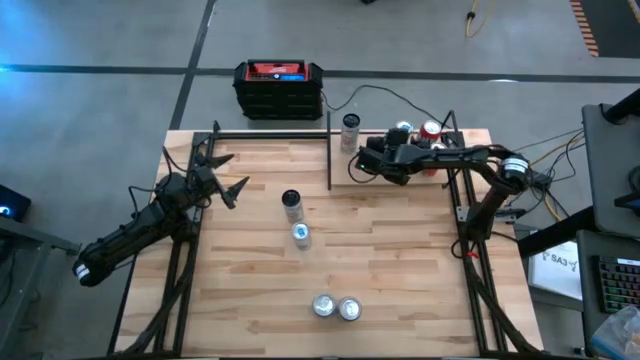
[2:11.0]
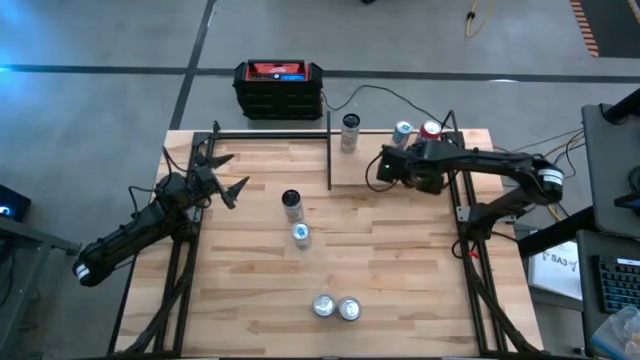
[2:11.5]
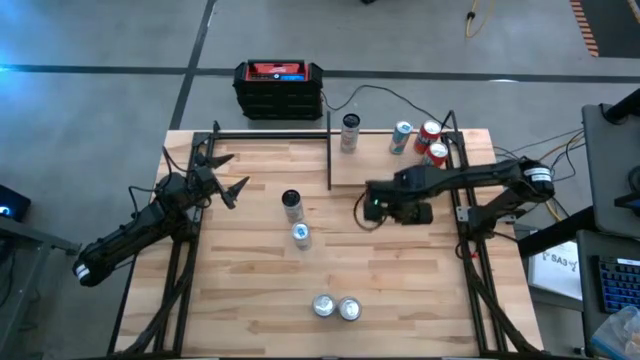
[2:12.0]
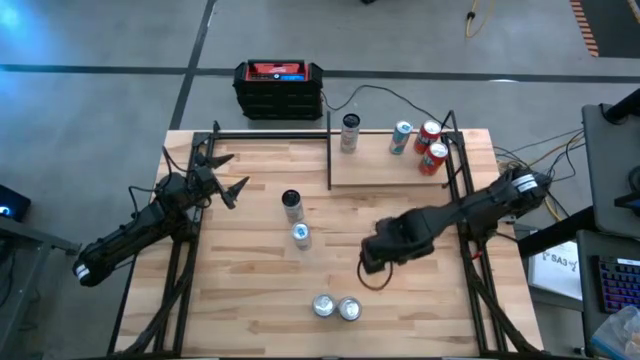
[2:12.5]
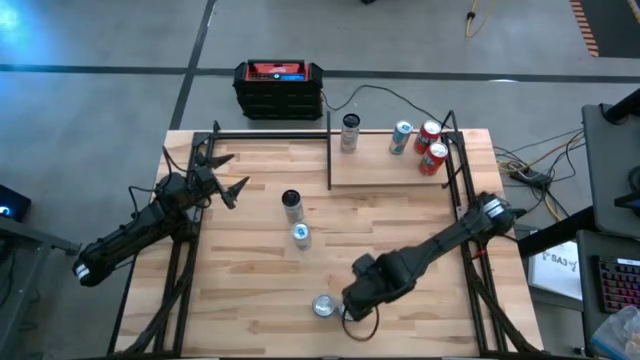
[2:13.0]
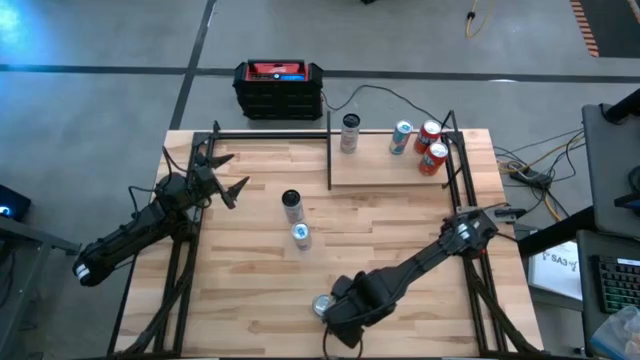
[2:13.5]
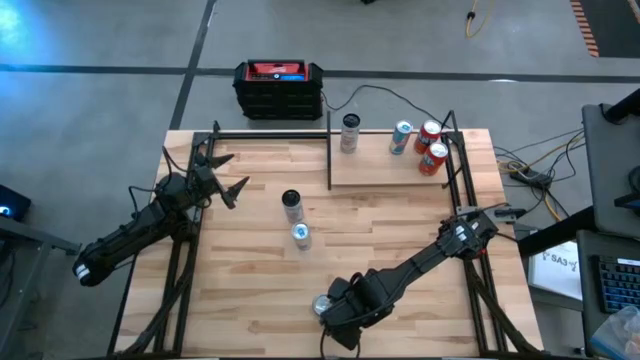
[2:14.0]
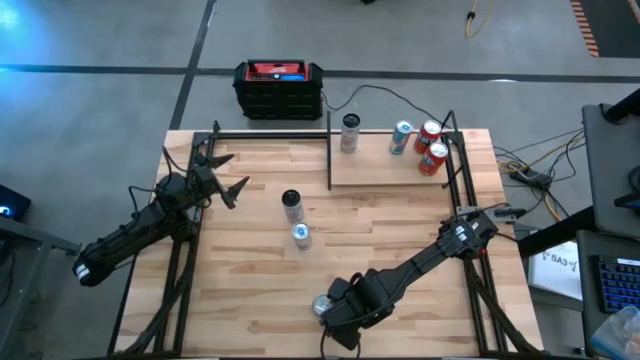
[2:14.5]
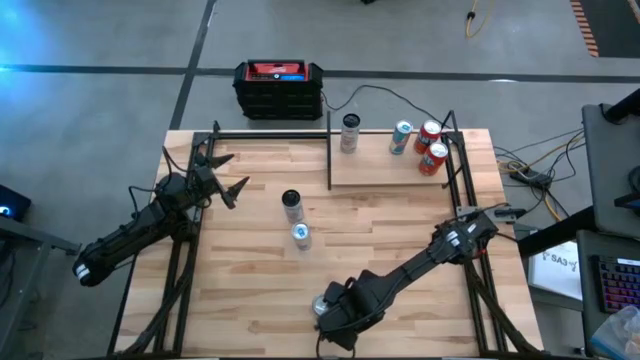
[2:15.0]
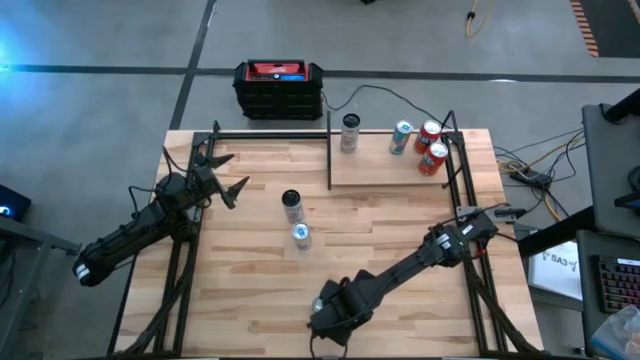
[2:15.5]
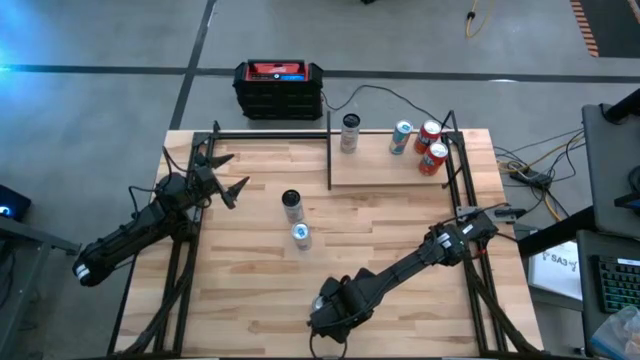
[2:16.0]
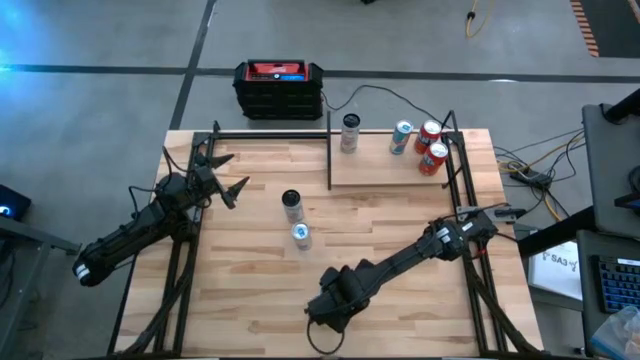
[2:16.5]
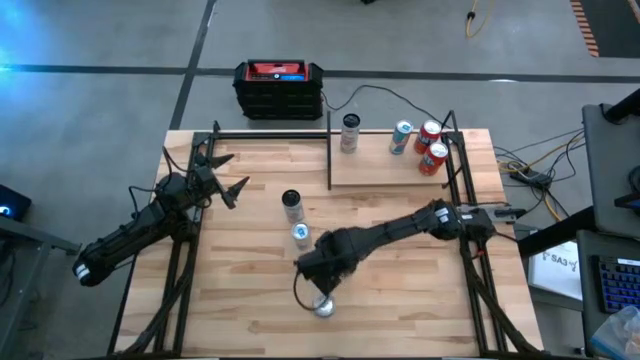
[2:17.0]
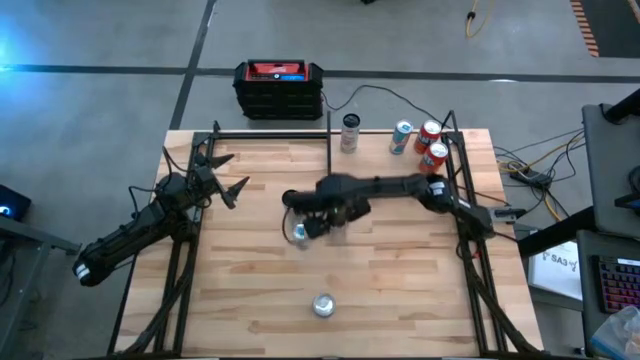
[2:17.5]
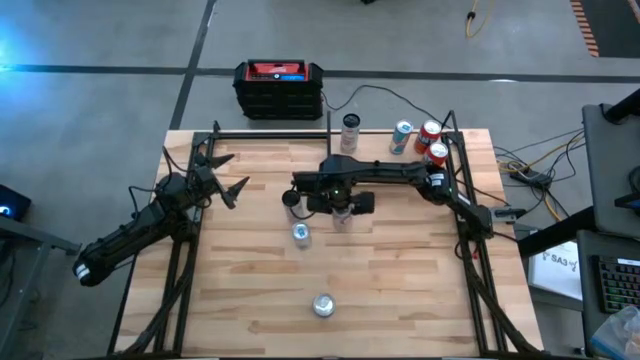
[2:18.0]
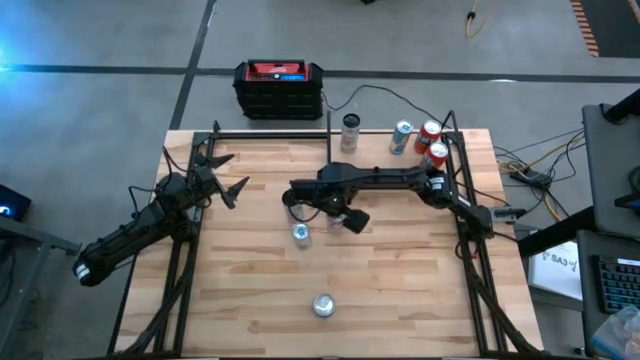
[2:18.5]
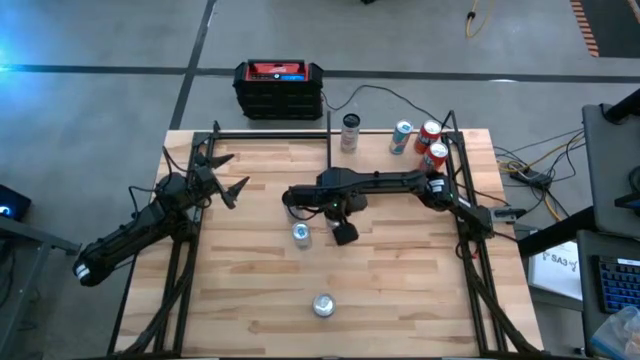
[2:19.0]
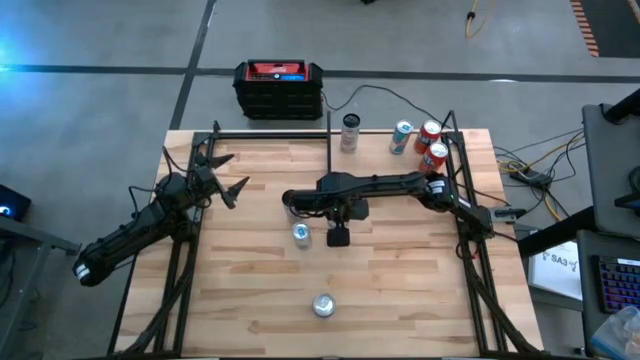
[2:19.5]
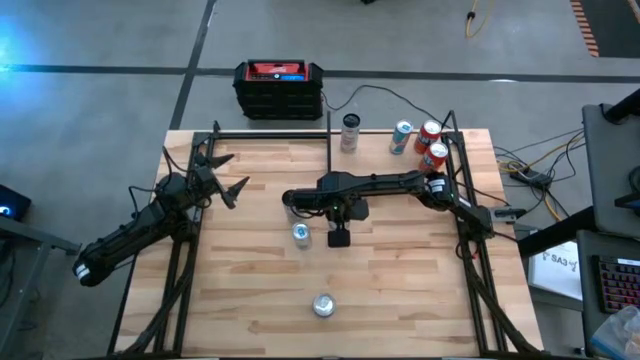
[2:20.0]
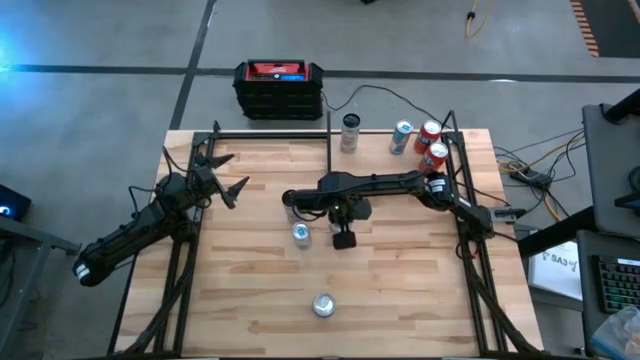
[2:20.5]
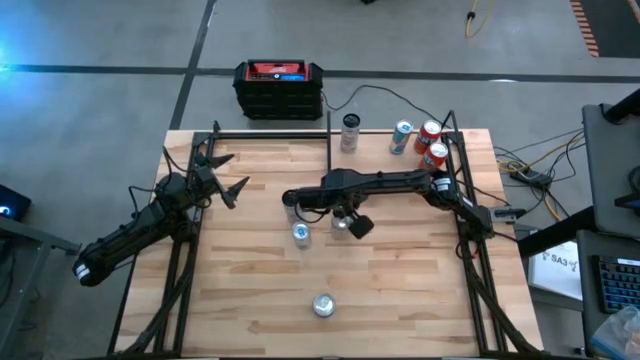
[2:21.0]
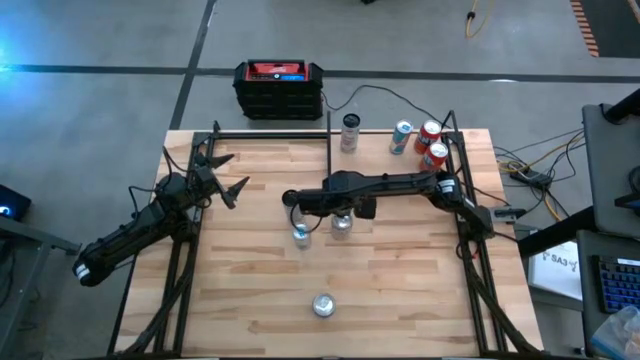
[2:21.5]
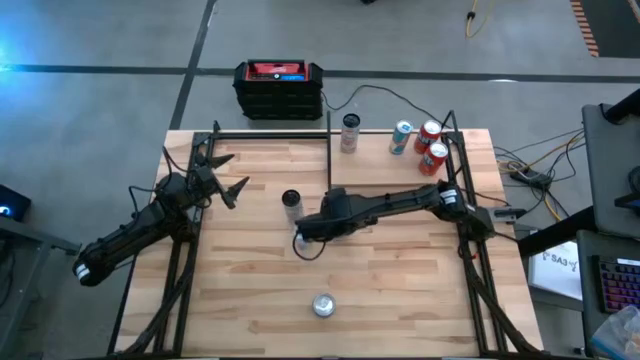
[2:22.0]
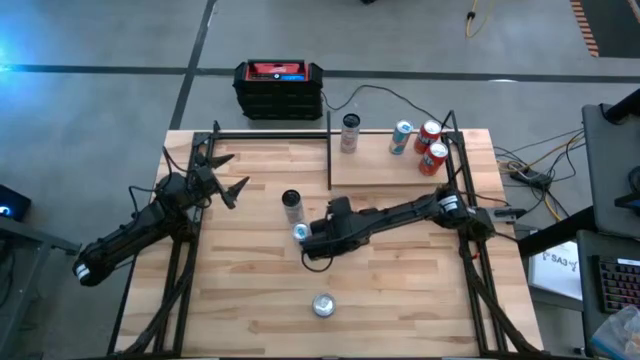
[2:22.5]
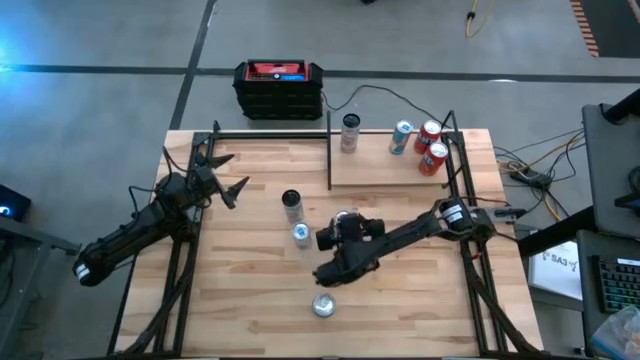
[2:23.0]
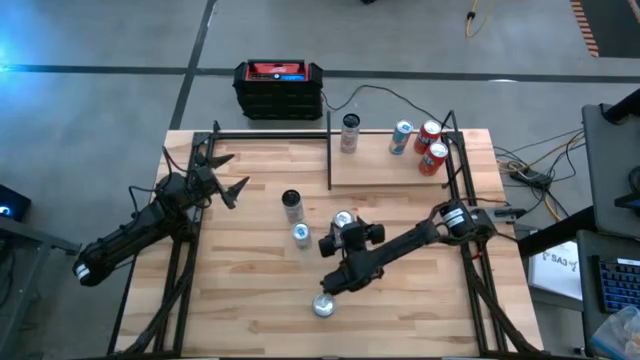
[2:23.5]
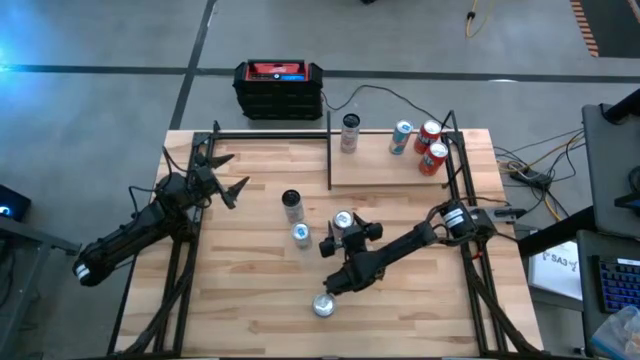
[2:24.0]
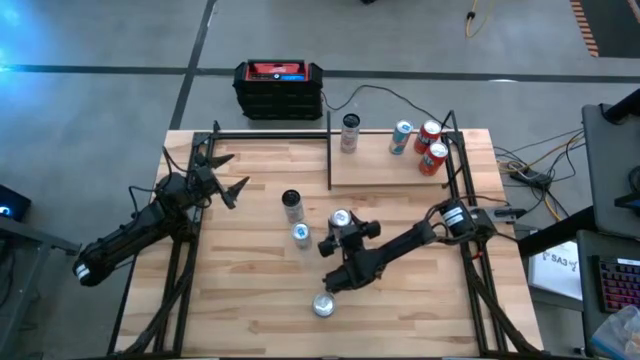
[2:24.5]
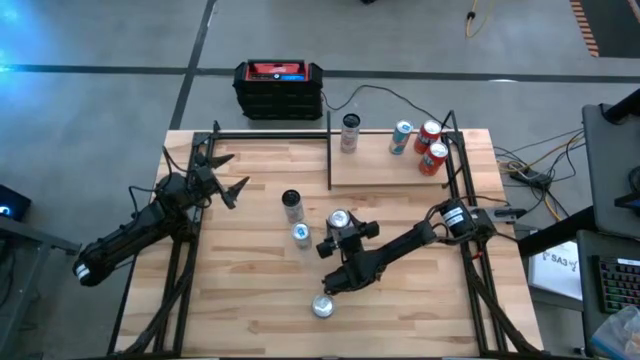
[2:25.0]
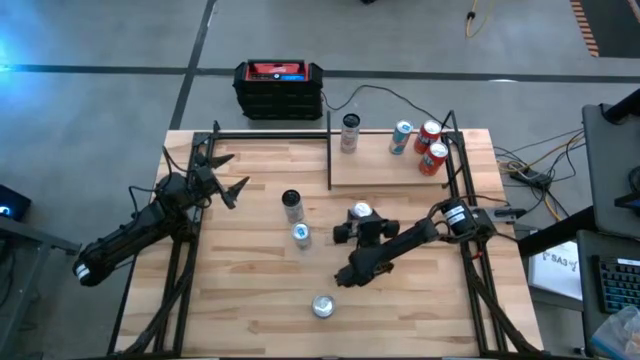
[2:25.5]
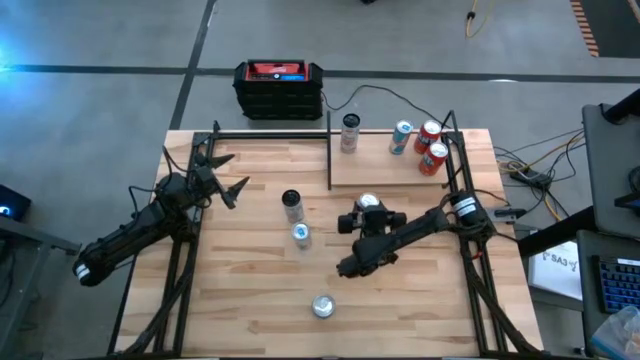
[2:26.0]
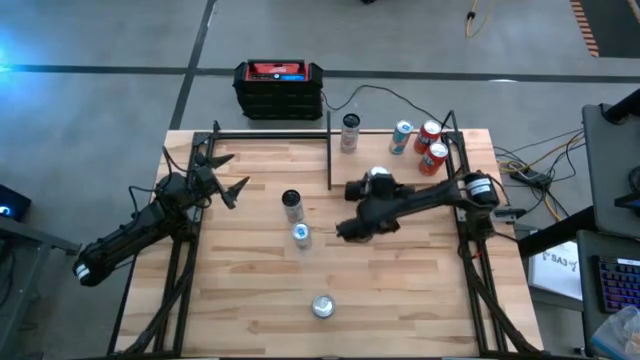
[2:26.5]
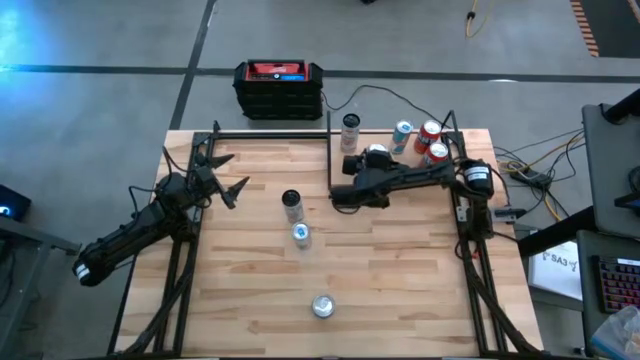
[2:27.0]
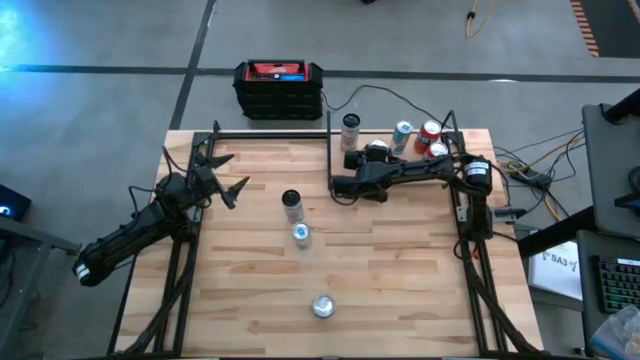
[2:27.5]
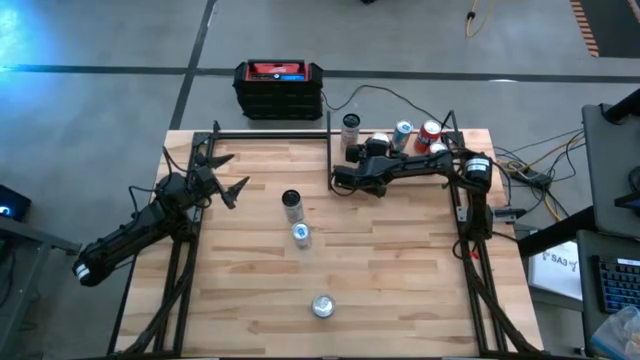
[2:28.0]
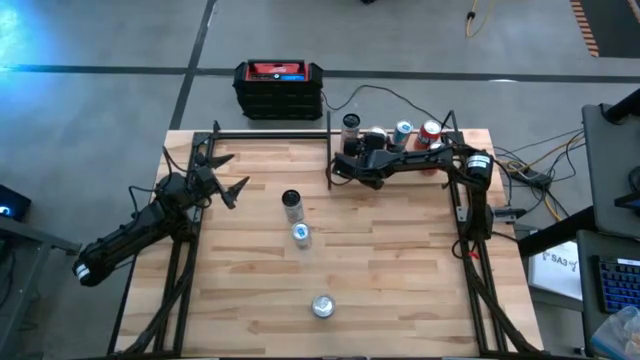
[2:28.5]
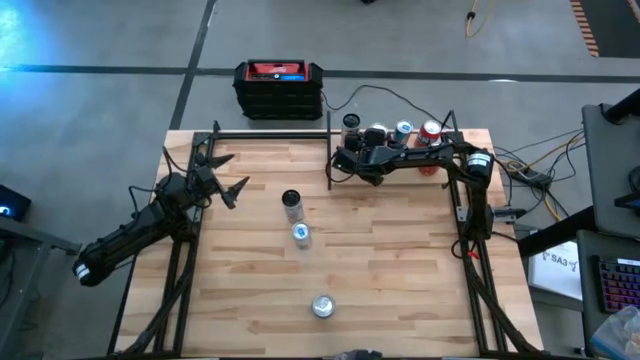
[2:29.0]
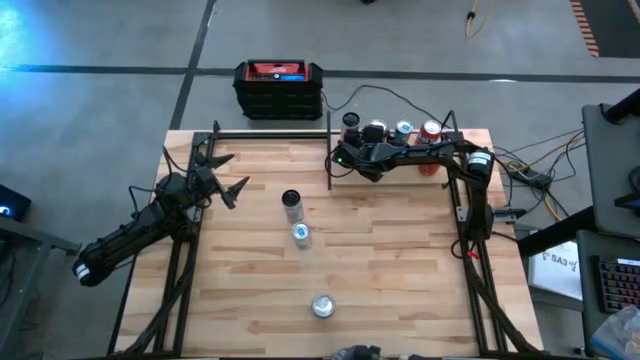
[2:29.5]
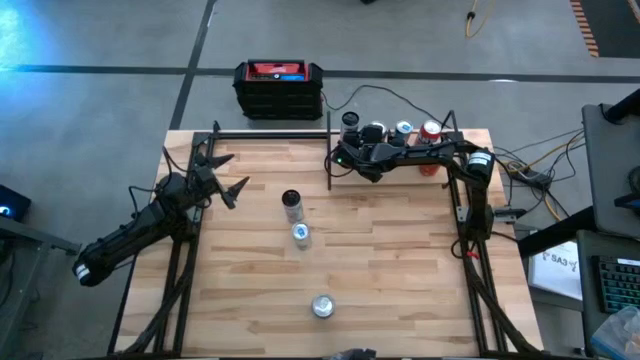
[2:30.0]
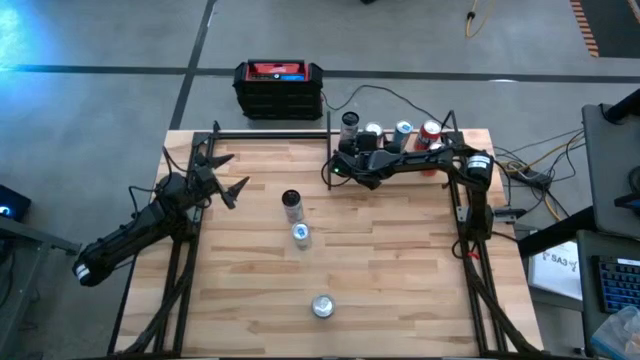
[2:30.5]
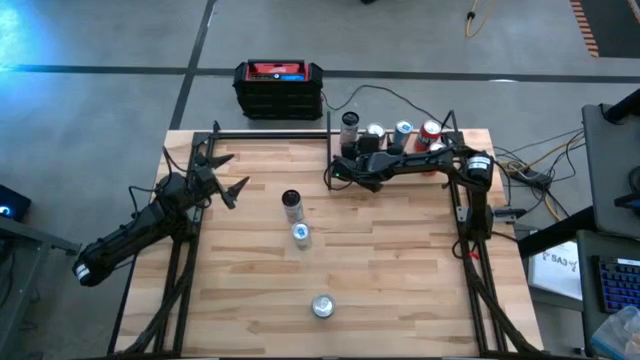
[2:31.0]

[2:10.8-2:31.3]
Task: Place canned beverage on shelf
Put the right silver soda can on the shelf
